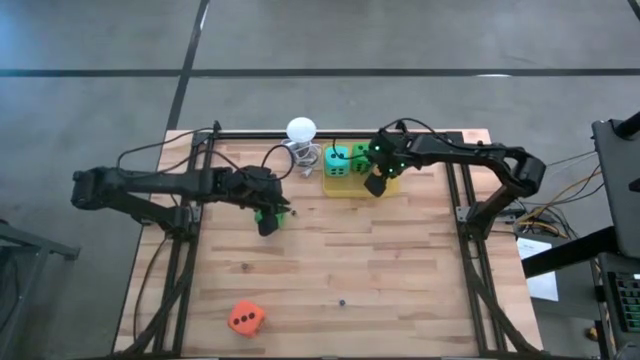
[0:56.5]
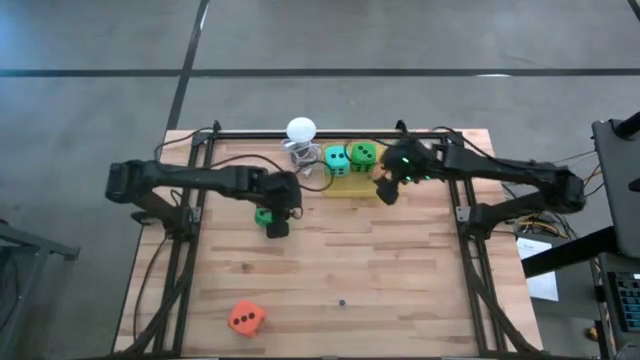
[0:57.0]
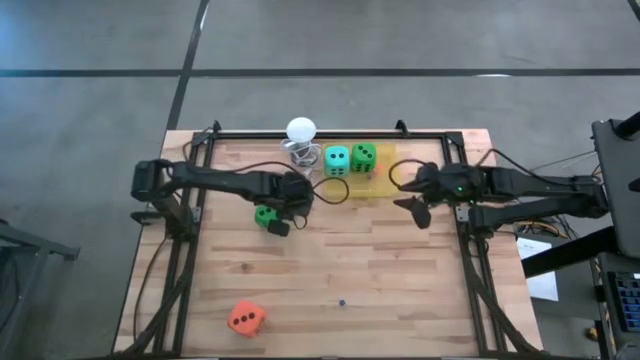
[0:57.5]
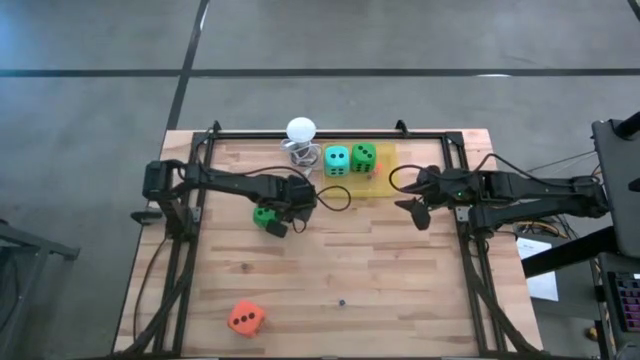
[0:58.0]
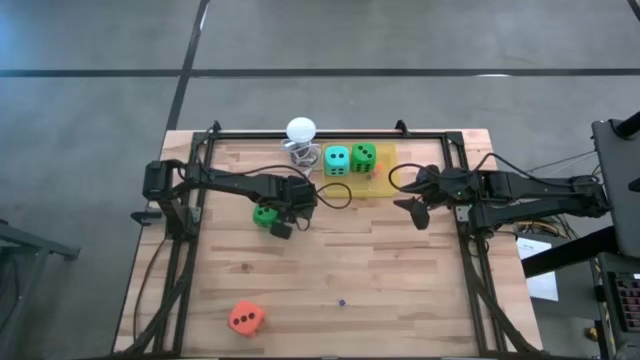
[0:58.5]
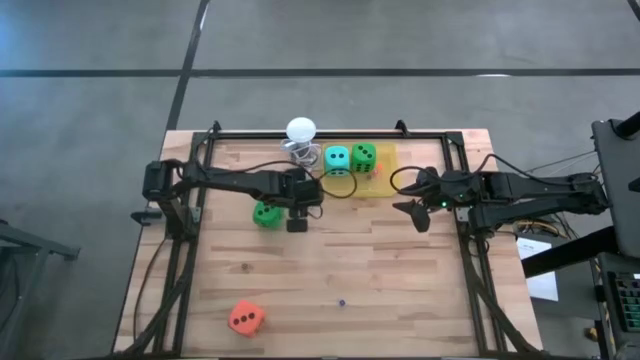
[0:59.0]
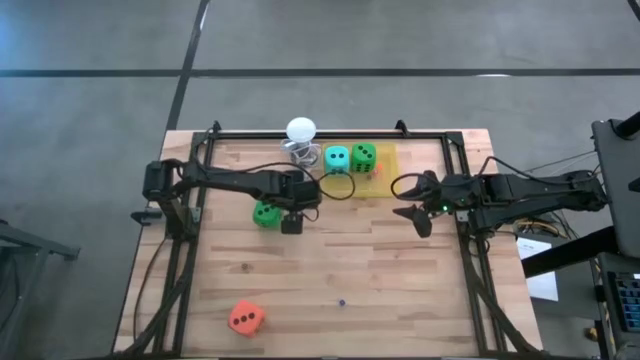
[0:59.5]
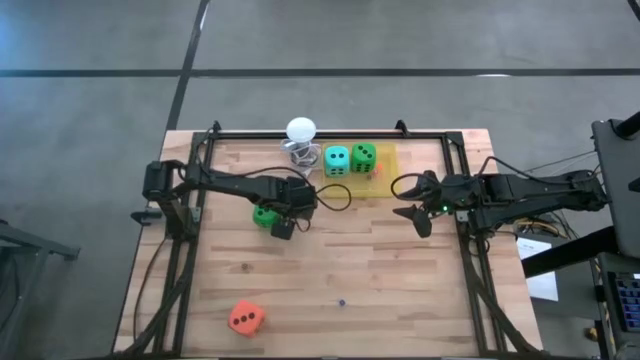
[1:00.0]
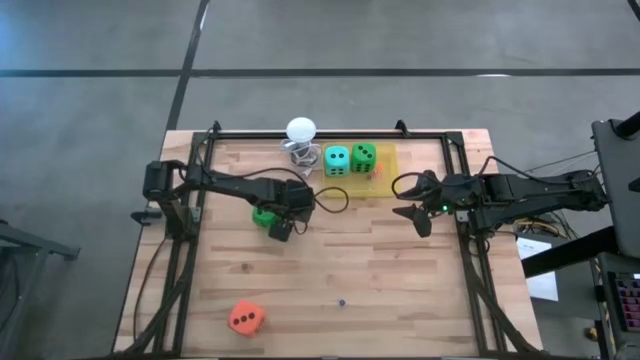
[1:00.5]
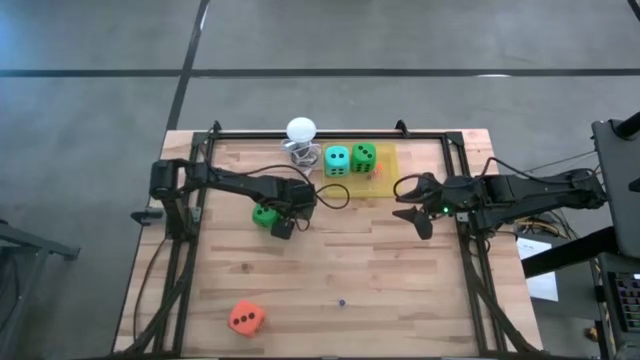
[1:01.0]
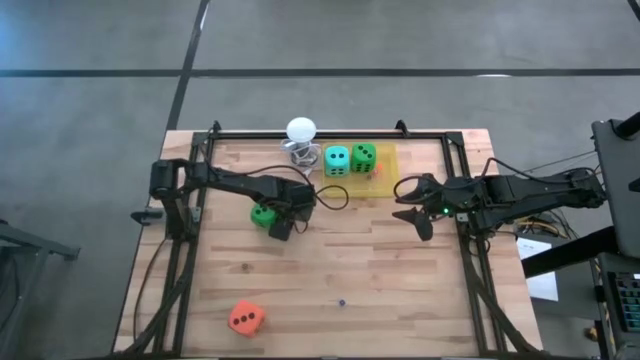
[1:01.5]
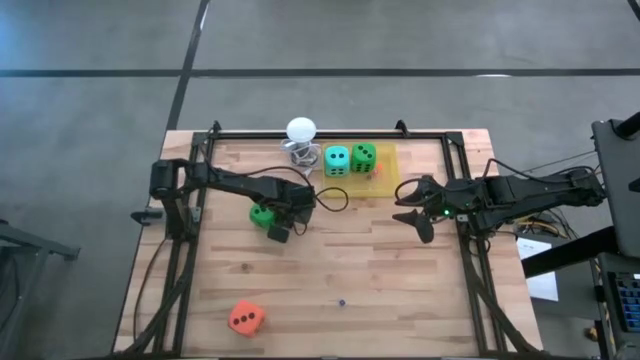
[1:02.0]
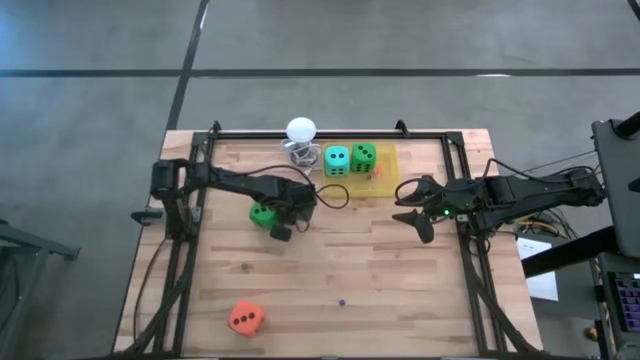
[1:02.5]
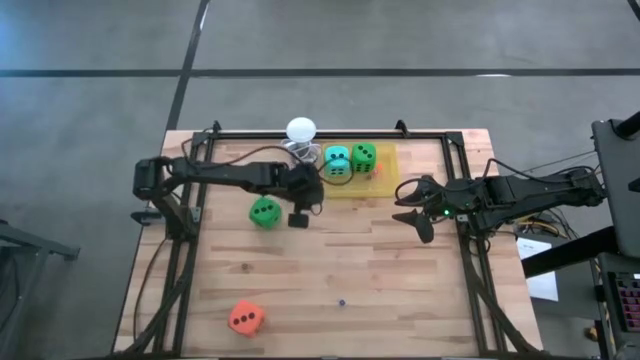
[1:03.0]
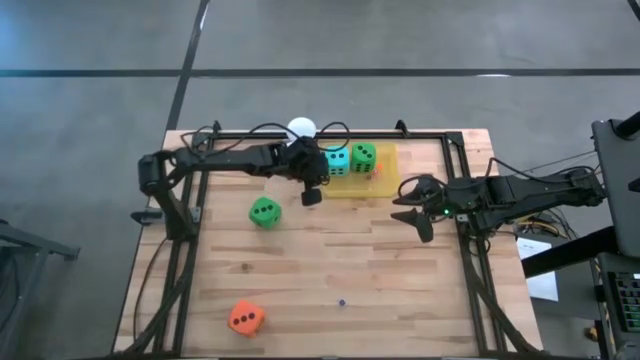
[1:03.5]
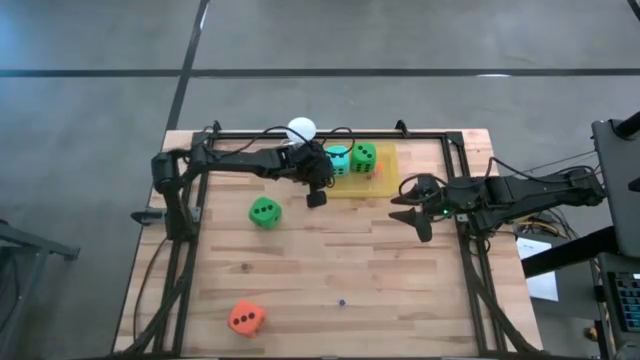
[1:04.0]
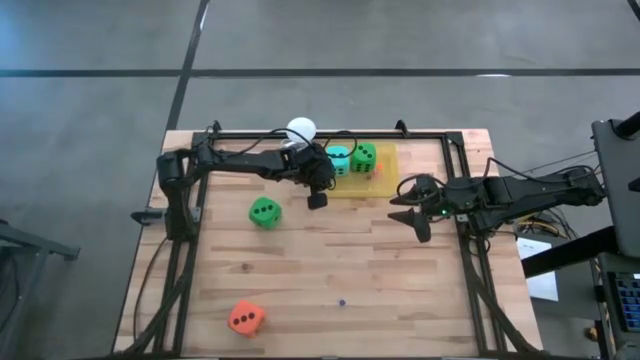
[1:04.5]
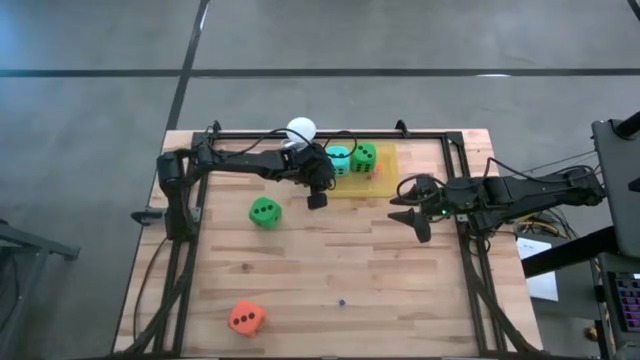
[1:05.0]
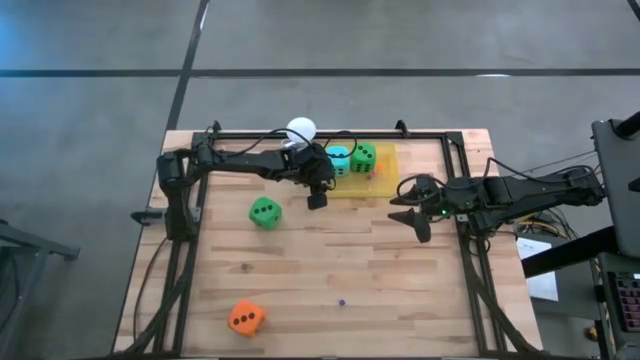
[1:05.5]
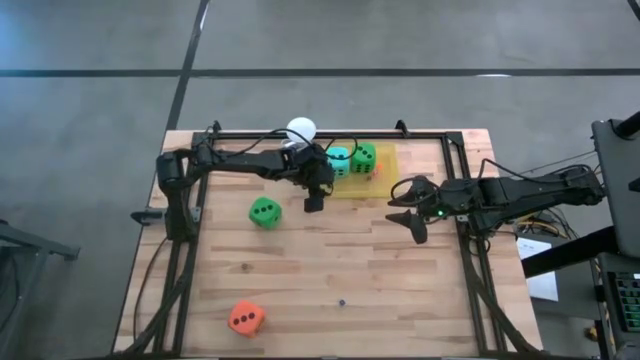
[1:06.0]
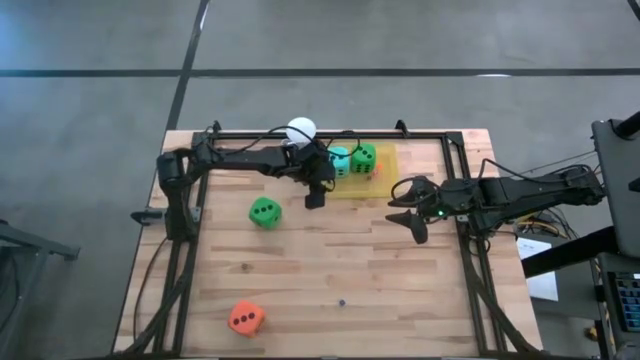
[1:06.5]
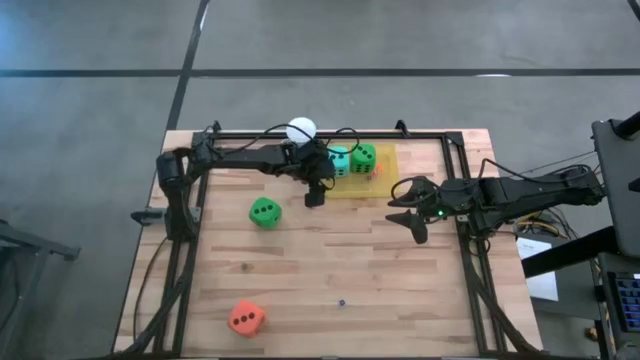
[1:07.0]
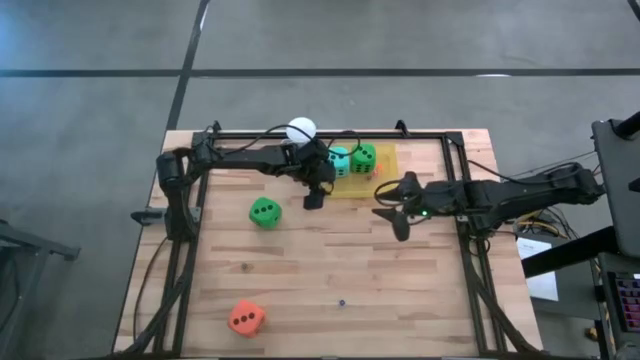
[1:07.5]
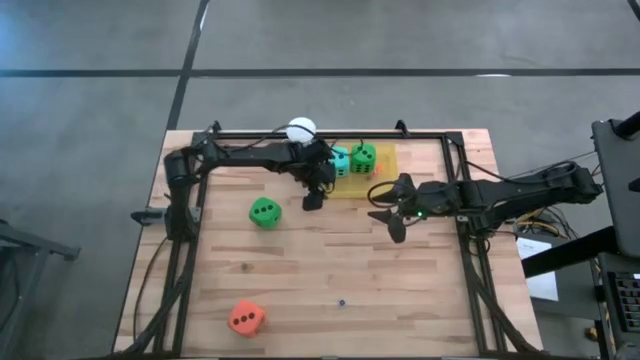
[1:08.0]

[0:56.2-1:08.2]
Task: Pick & Place Dice
Put the top small black dice into the yellow bin

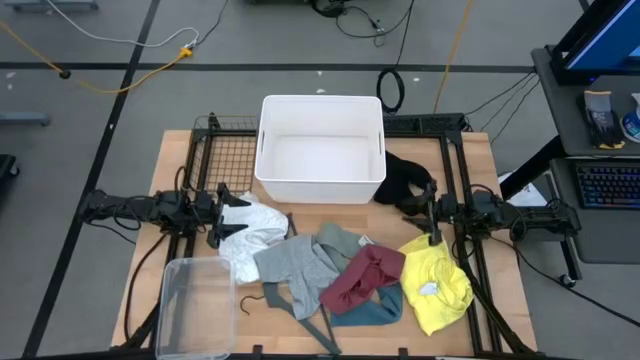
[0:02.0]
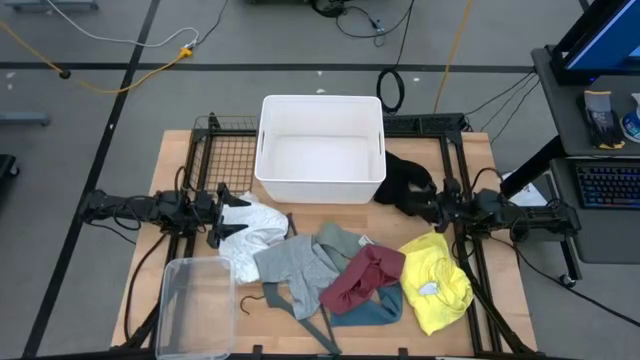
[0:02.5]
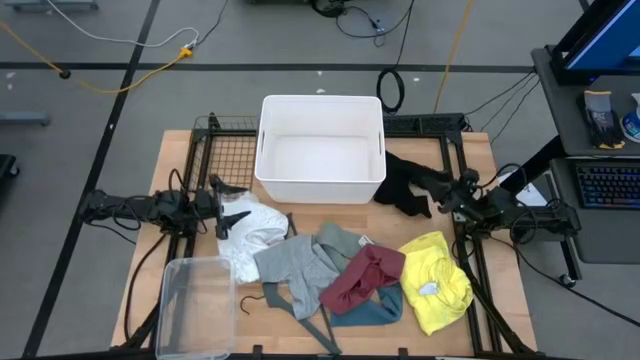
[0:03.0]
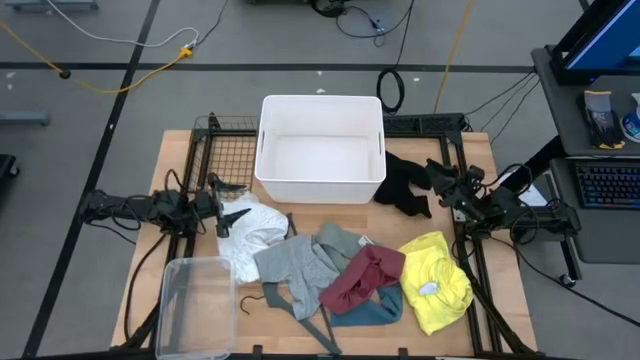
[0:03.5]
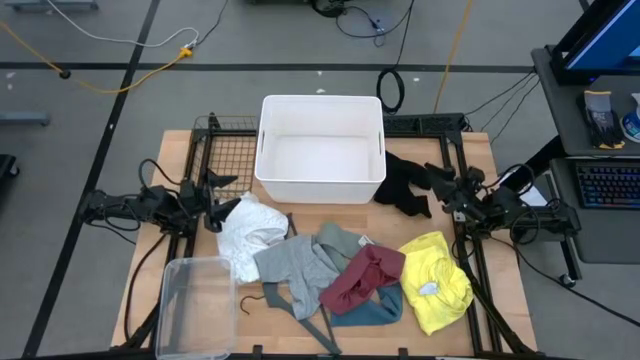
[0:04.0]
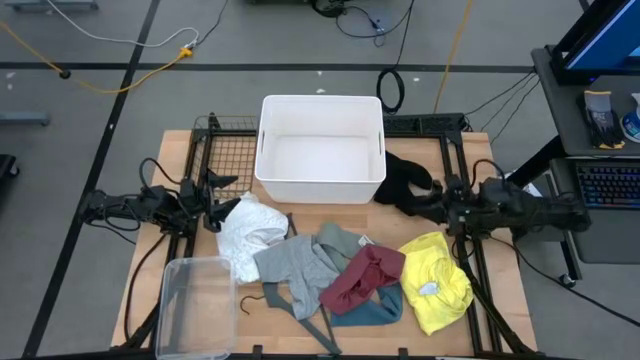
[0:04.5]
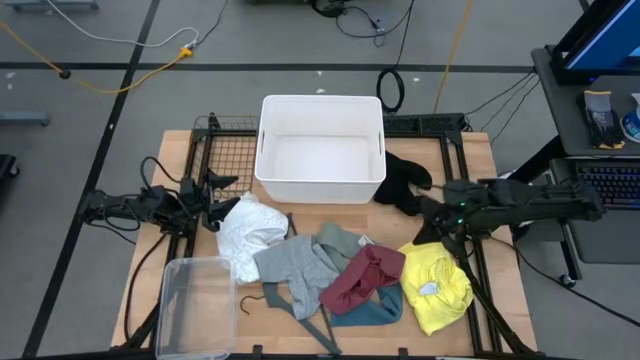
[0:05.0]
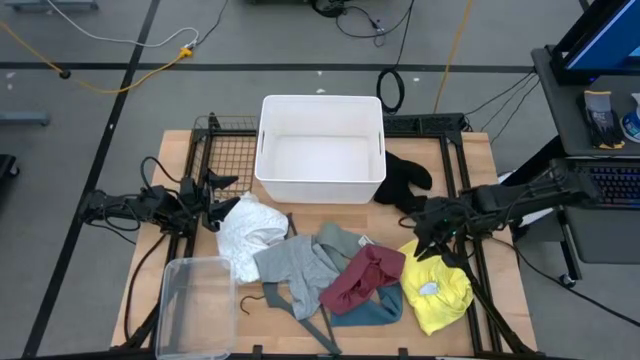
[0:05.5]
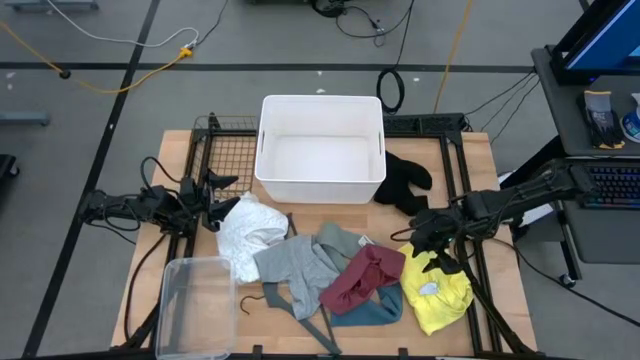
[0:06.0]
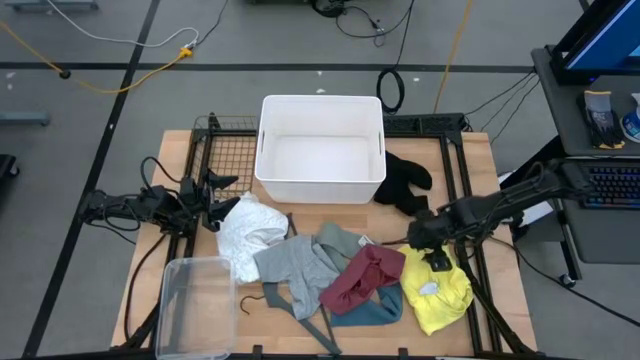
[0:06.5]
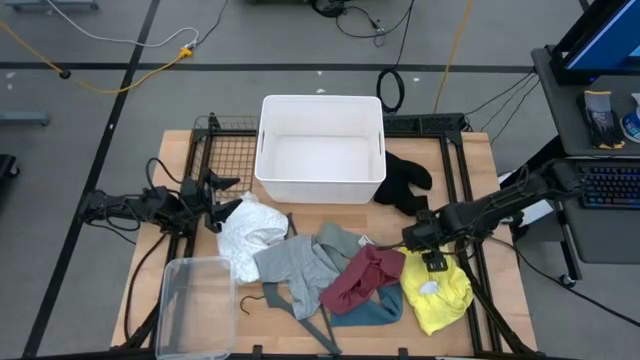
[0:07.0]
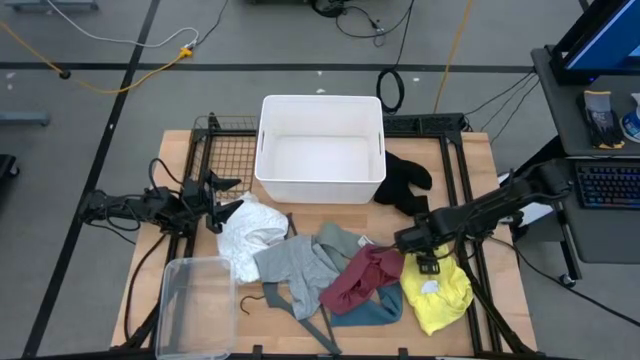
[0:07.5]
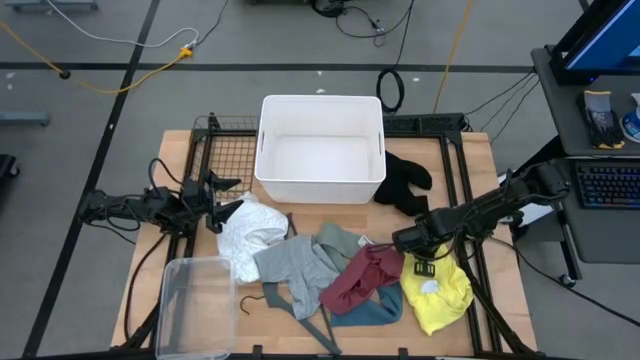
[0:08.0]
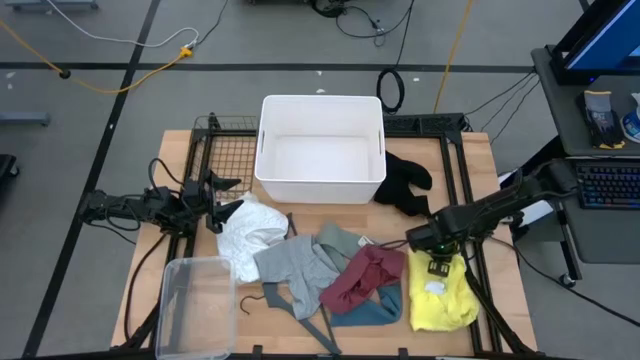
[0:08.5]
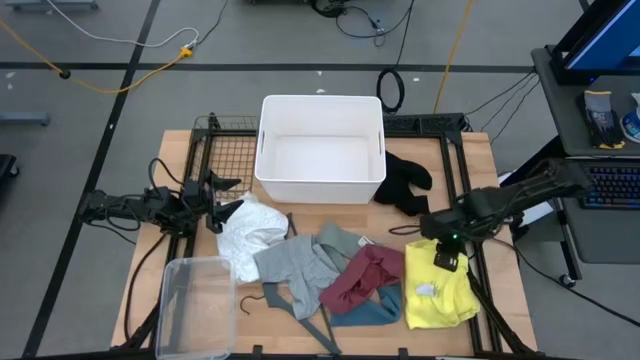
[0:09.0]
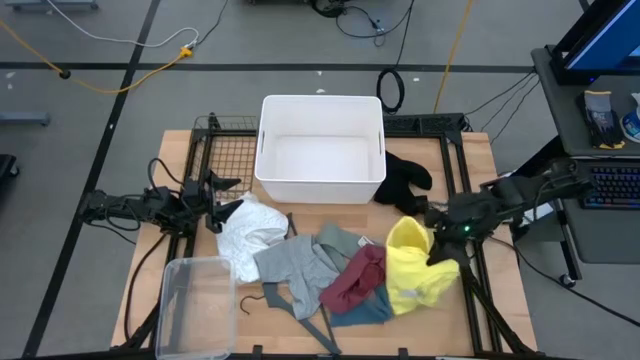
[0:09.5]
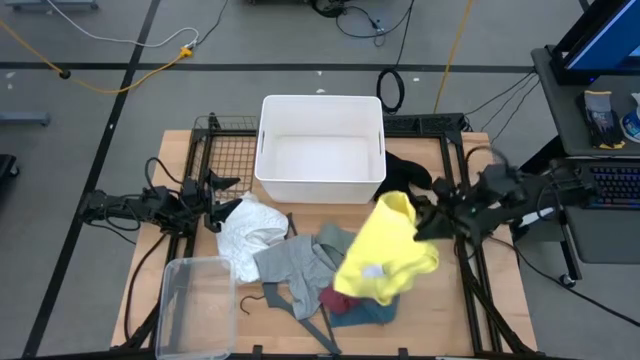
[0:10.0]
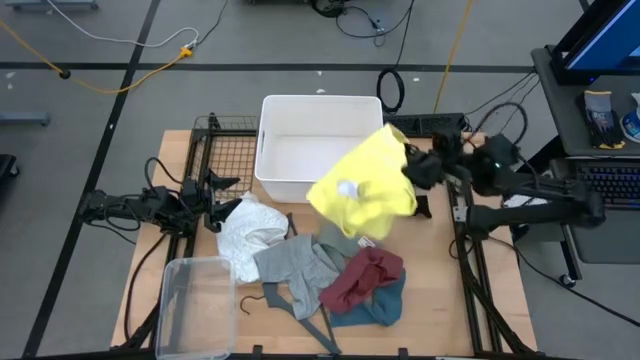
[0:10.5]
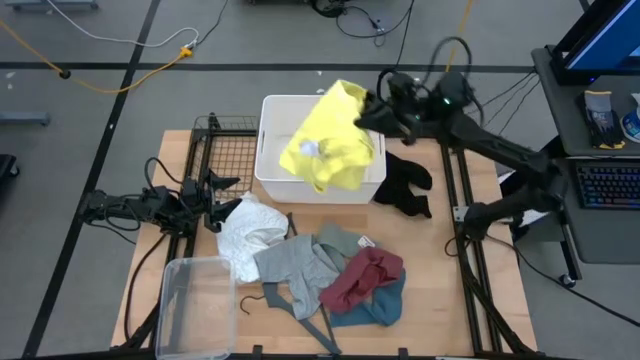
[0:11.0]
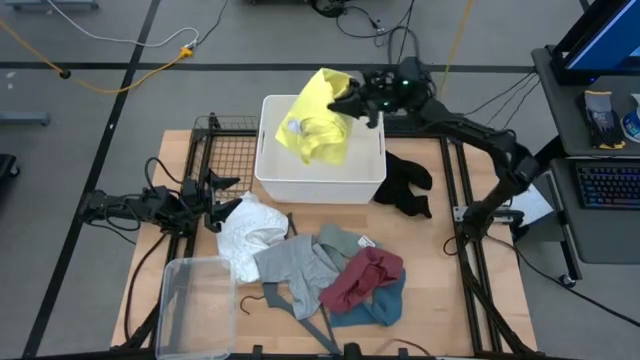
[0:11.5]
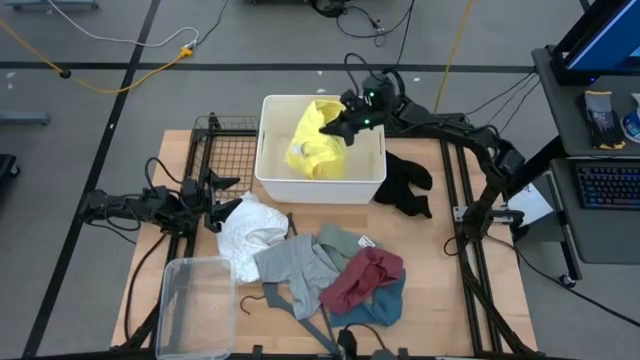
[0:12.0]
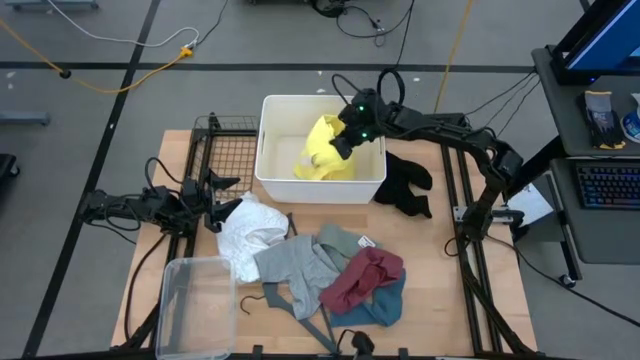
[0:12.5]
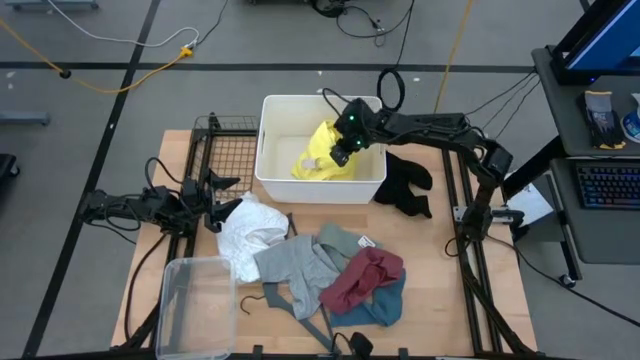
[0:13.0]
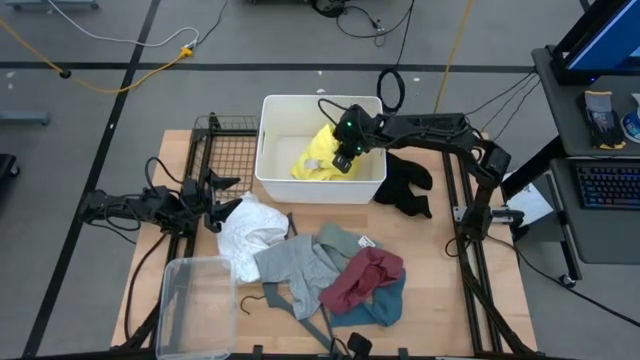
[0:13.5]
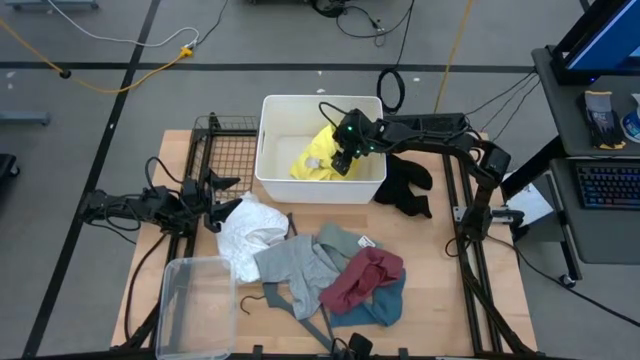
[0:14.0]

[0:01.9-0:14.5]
Task: Pick & Place Cloths
Put the yellow shirt into the white bin
